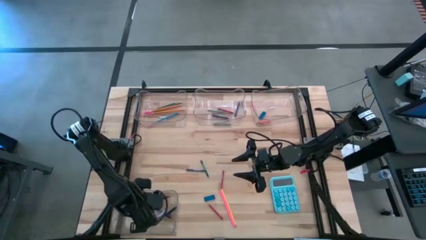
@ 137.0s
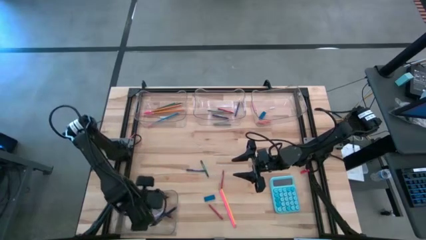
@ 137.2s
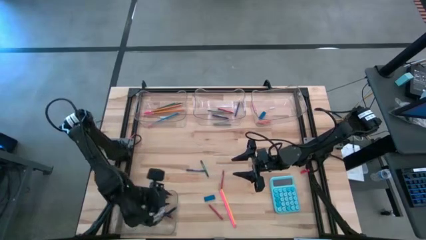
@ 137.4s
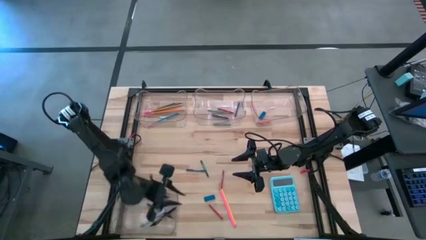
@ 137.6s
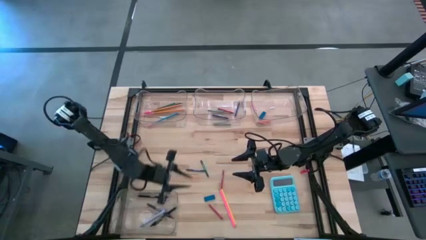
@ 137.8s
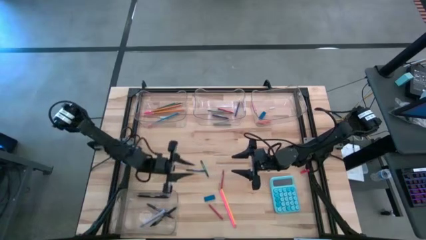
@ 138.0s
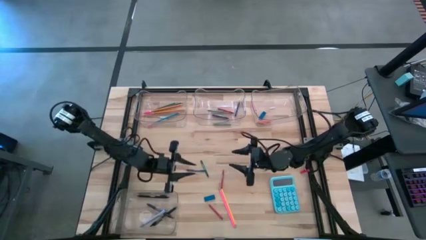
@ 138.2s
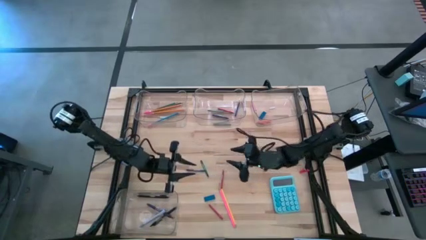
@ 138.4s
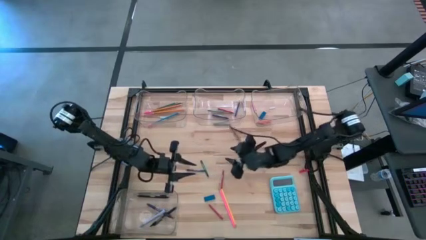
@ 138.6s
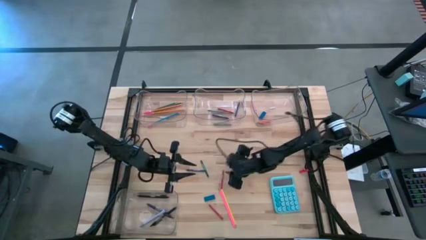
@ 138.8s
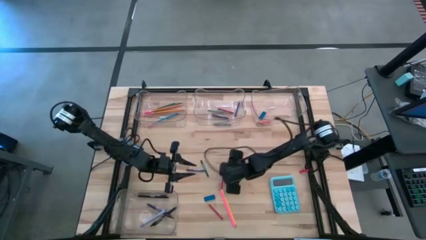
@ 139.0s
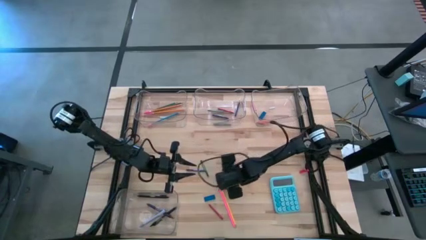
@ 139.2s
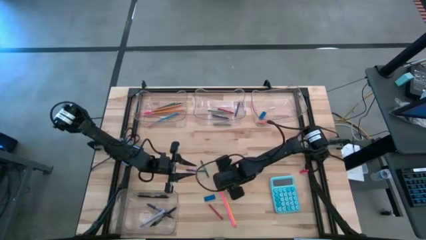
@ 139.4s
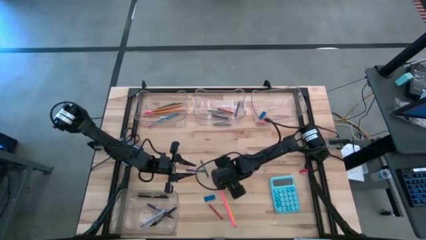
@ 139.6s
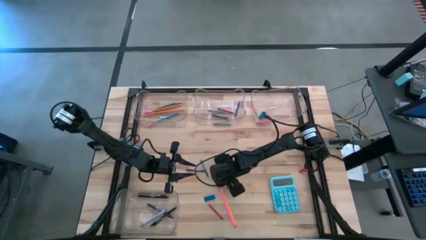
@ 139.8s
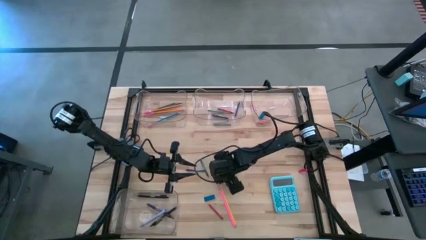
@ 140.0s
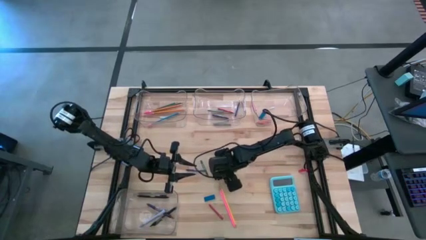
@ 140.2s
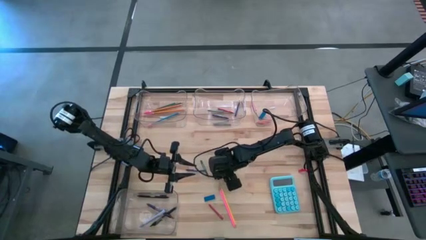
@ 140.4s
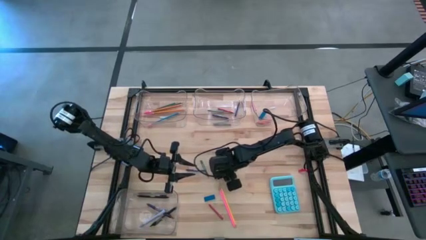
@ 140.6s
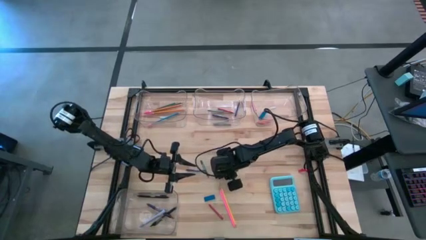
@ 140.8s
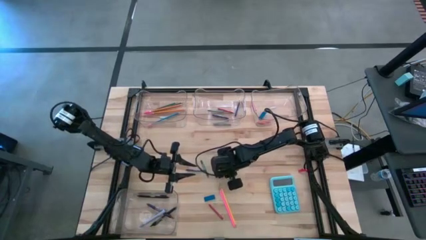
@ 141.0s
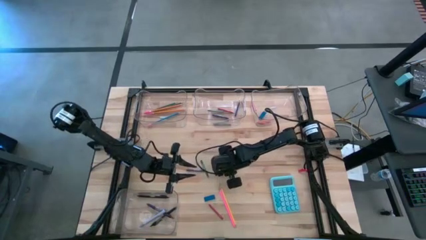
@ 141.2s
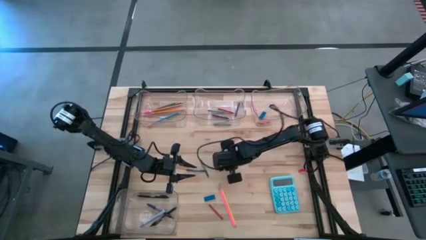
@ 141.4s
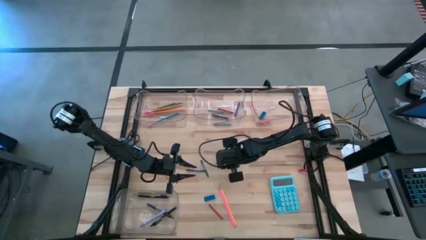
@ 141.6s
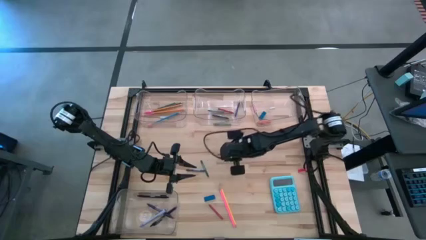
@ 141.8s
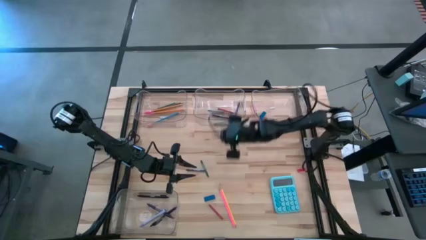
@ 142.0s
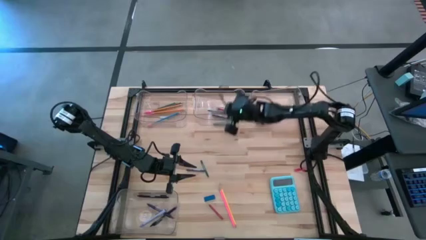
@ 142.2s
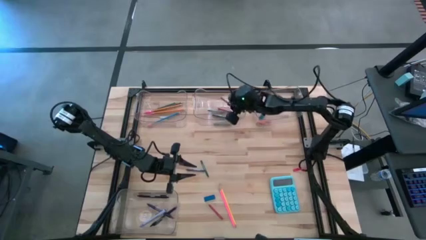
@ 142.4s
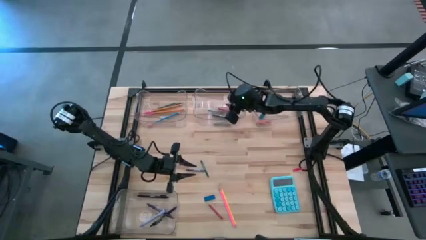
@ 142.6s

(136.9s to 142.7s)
Task: Sort crayons/erasers/pens/pencils in bins
Put the red crayon into the top middle transparent bin

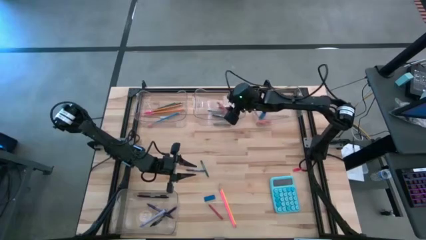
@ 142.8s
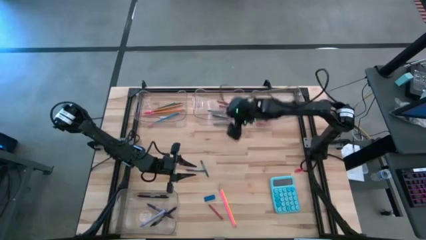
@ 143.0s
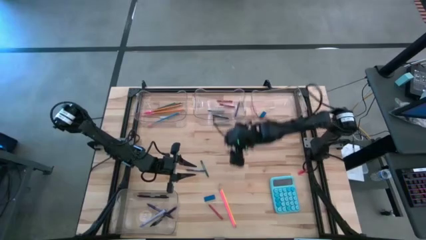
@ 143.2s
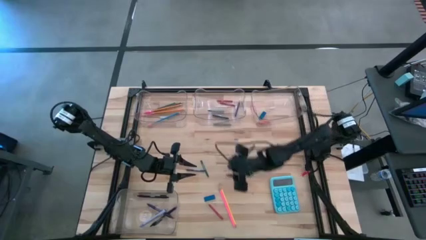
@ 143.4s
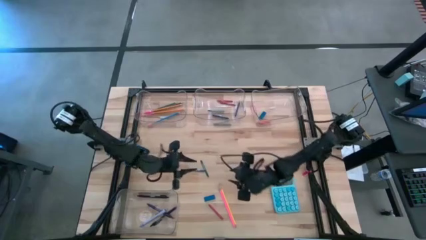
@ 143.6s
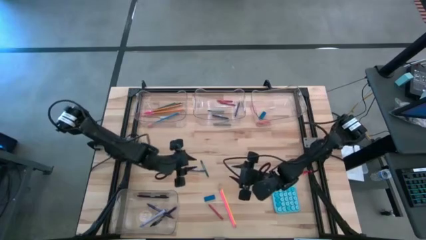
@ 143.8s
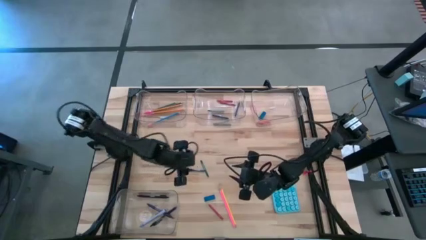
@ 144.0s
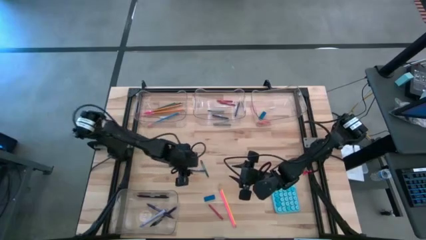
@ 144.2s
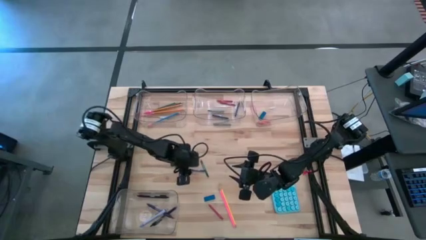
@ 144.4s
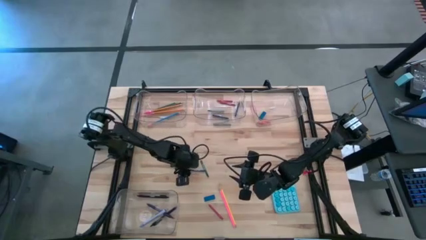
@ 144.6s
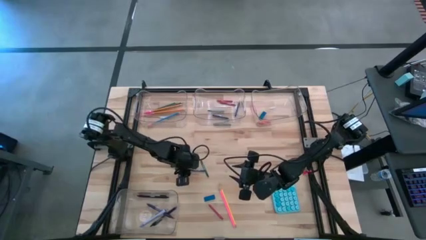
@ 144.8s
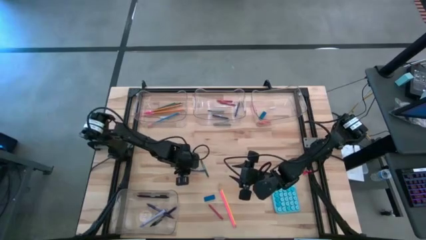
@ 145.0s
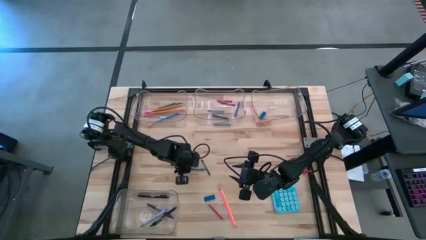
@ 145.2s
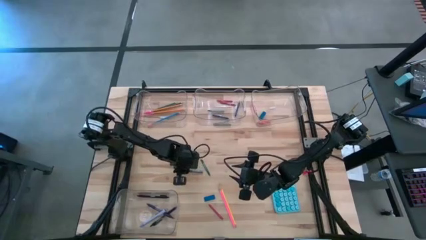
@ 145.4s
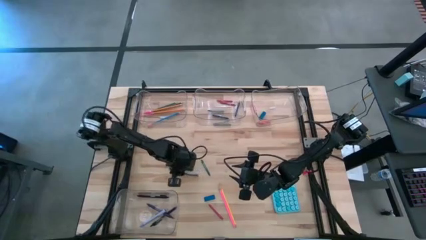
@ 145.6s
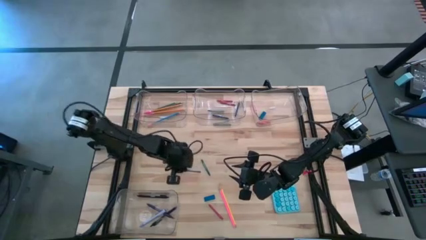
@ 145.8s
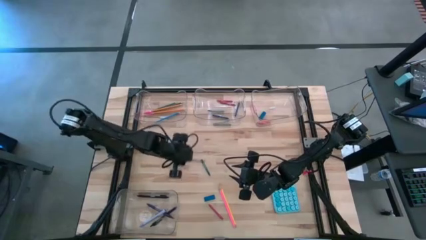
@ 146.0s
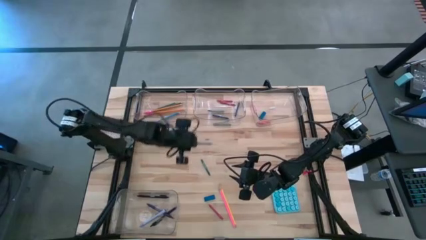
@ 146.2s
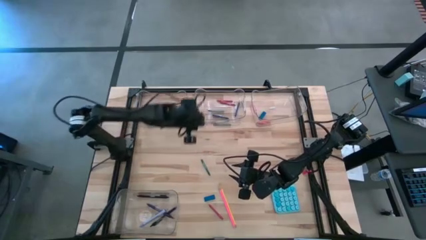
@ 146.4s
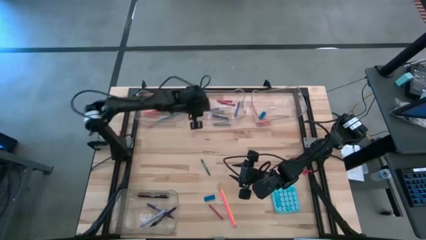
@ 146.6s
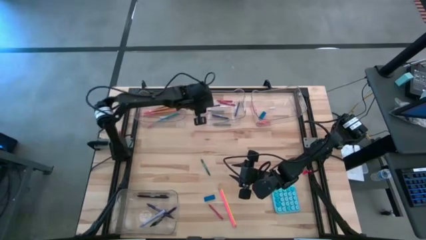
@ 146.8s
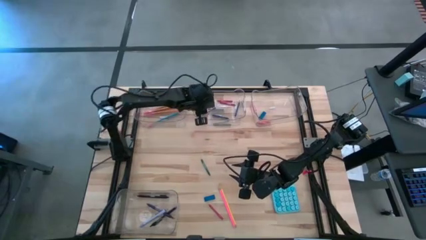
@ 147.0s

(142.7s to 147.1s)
Put the blue crayon into the top middle transparent bin

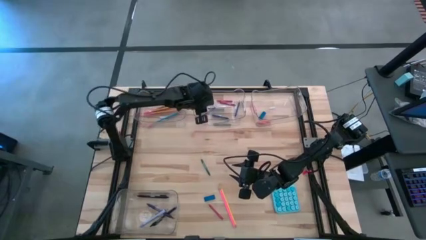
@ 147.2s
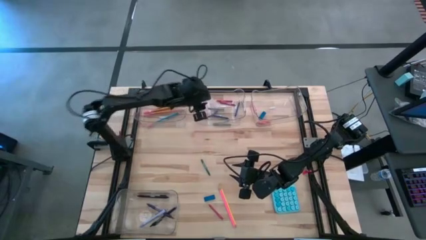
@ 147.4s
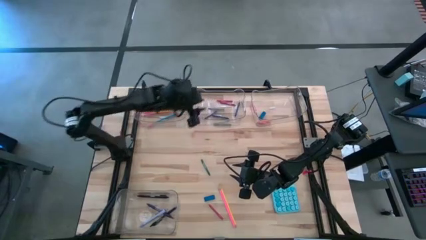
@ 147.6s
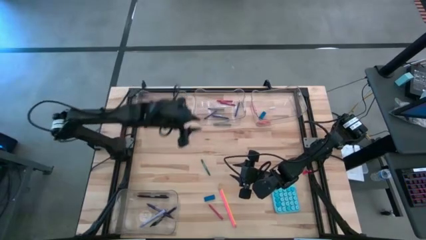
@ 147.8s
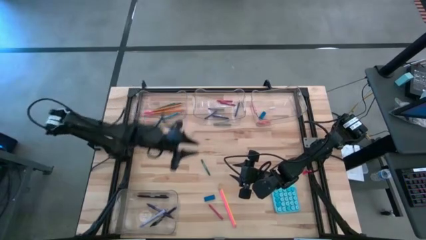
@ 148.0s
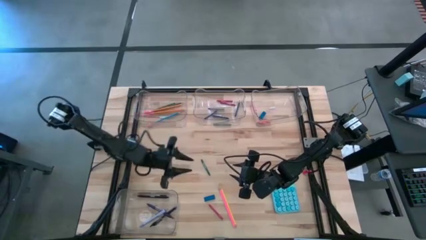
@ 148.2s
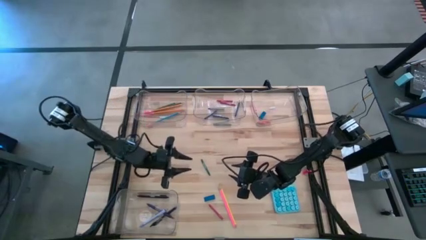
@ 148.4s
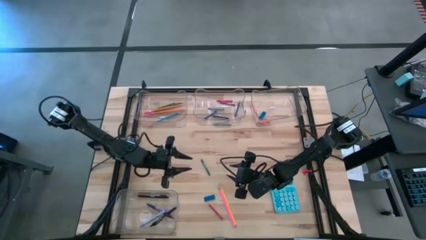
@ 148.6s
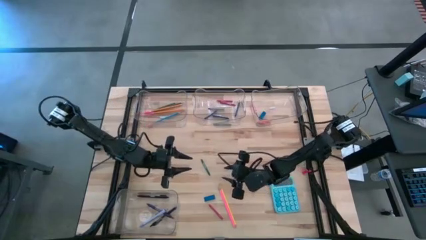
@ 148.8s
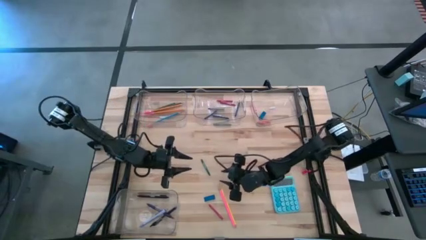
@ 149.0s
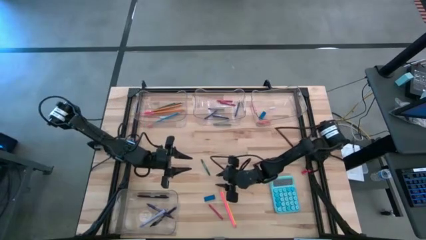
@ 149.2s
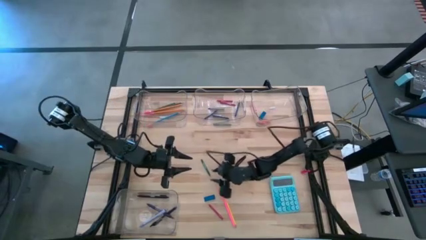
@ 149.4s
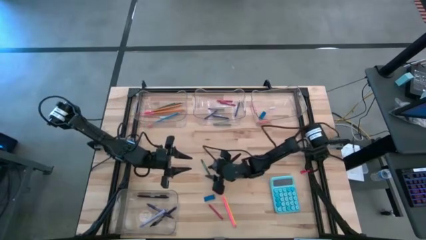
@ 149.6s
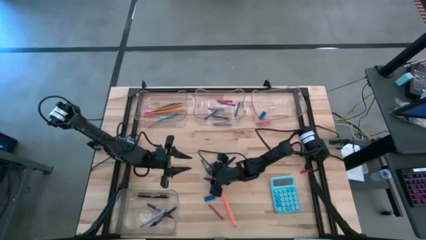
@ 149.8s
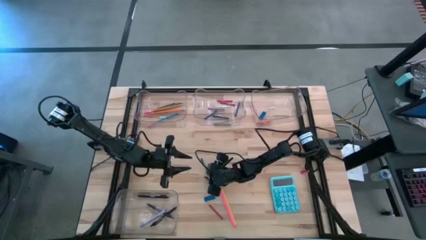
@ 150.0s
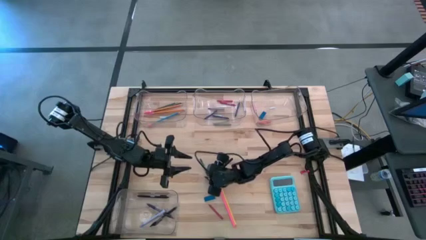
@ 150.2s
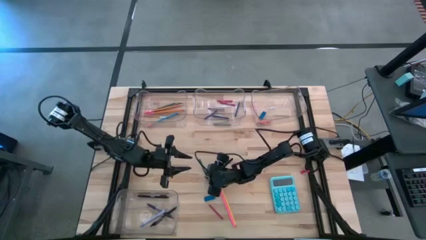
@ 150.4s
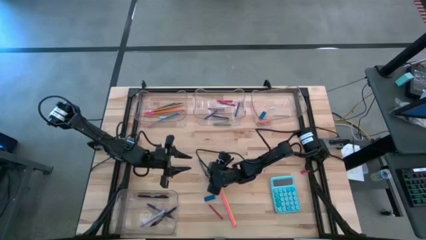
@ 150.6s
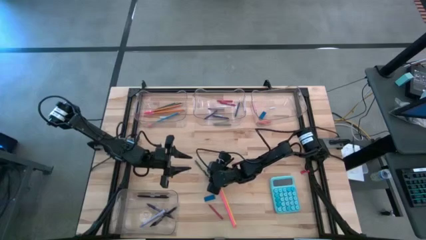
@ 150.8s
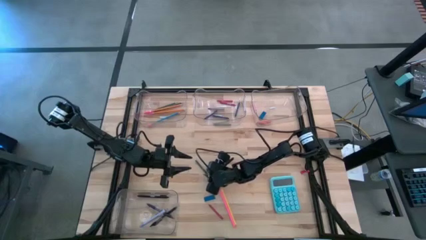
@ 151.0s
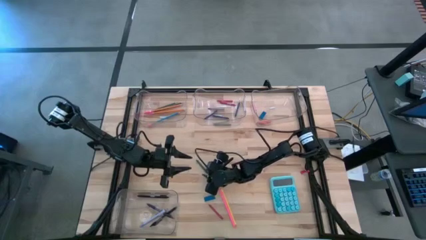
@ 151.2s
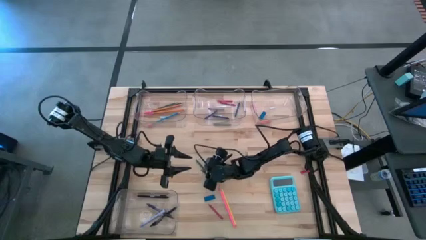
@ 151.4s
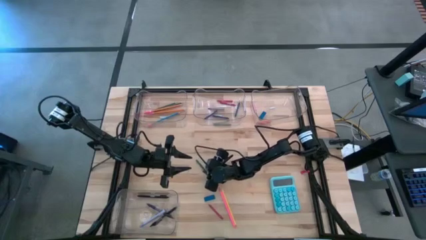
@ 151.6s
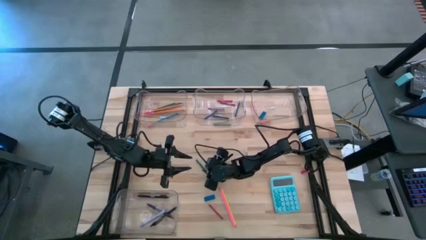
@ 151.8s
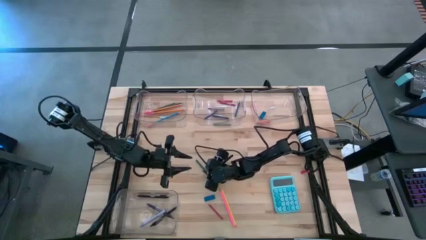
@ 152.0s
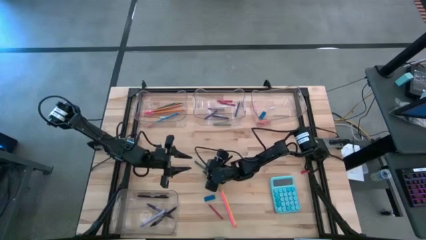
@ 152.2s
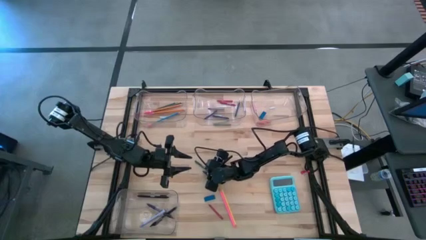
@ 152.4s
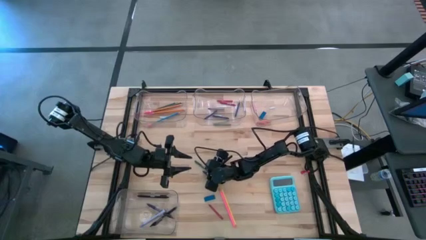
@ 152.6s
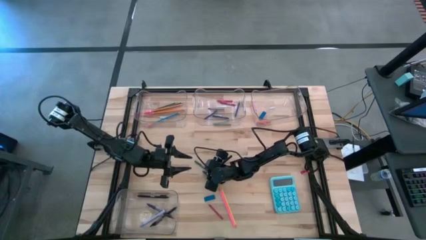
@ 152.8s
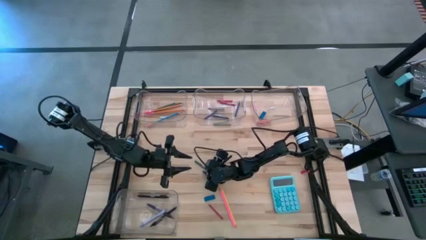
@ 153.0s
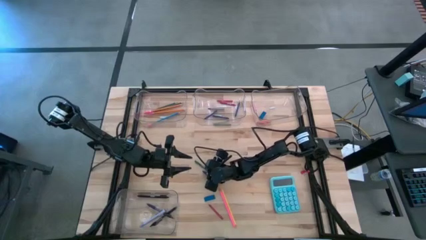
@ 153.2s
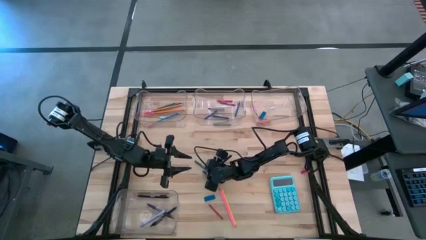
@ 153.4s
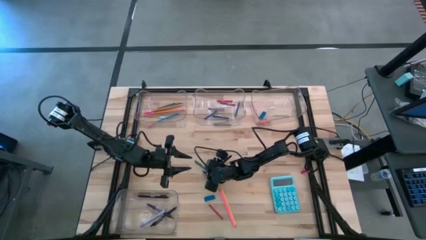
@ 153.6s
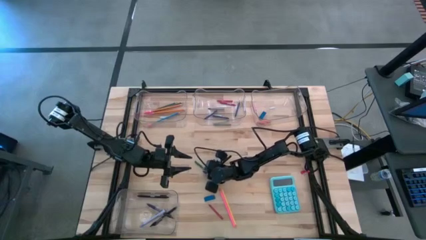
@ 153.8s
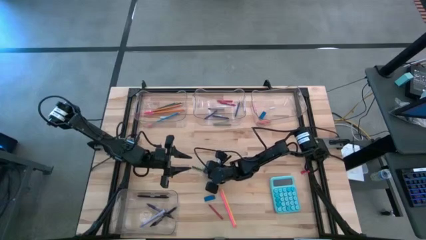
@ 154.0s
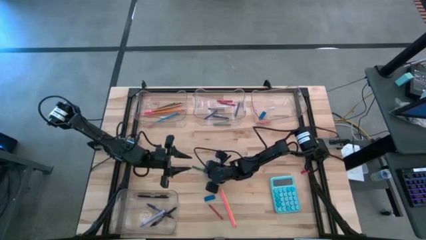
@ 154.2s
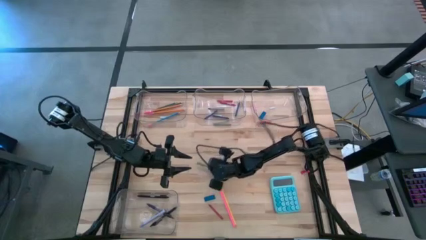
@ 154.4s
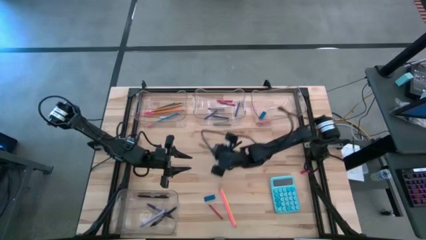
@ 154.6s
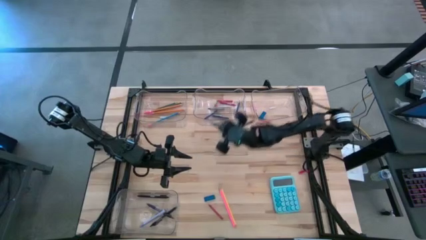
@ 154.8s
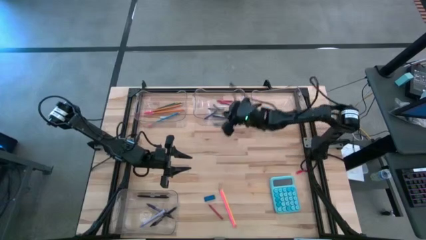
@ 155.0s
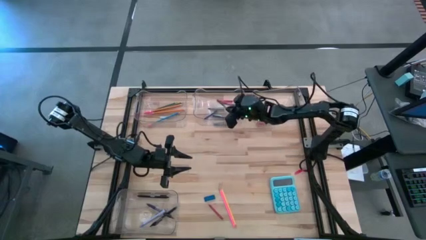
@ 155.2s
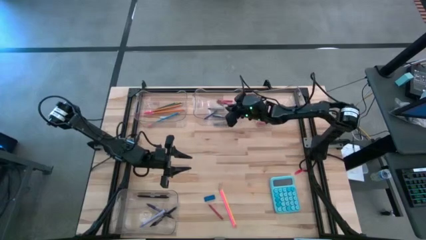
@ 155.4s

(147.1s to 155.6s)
Put the green crayon into the top middle transparent bin
